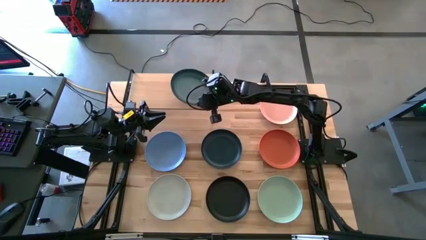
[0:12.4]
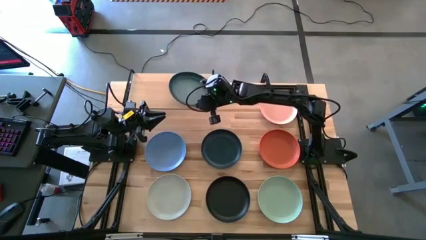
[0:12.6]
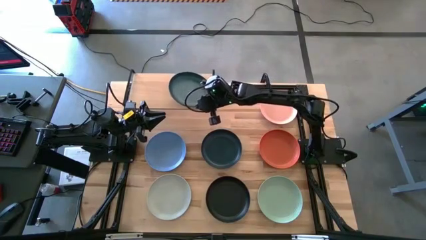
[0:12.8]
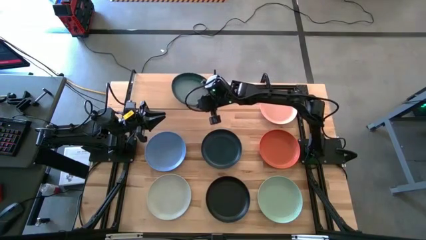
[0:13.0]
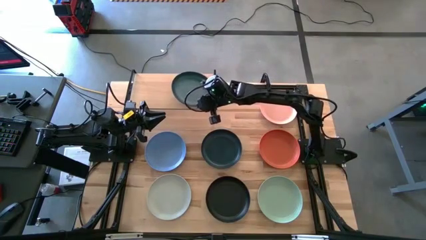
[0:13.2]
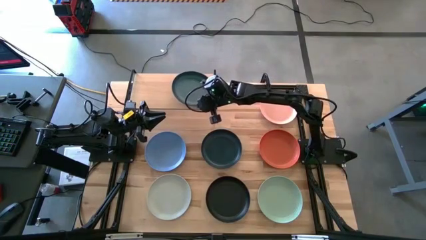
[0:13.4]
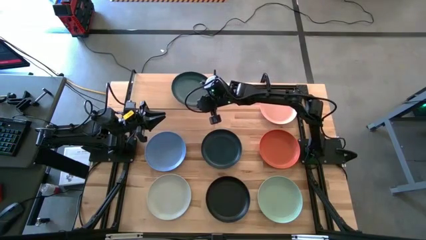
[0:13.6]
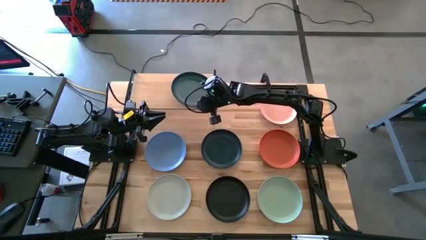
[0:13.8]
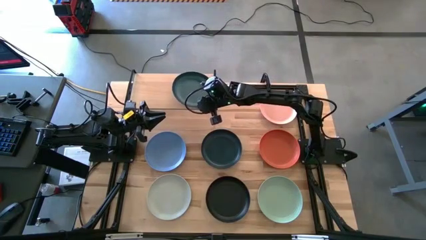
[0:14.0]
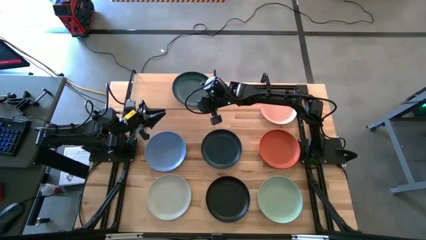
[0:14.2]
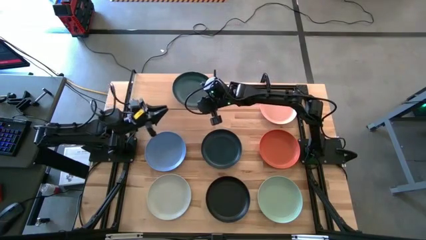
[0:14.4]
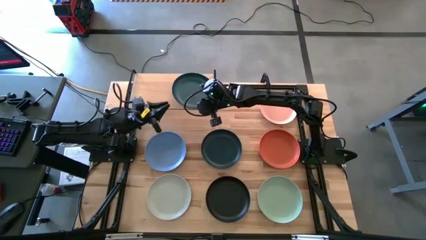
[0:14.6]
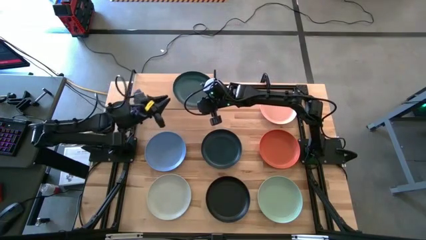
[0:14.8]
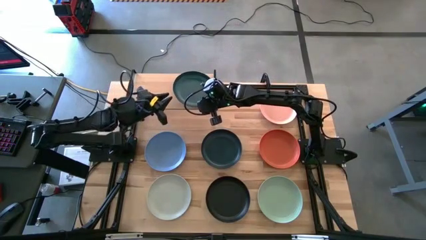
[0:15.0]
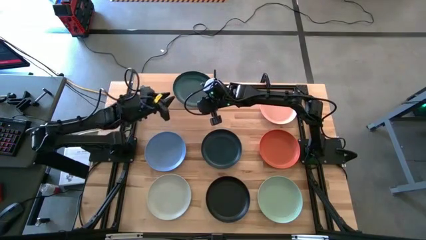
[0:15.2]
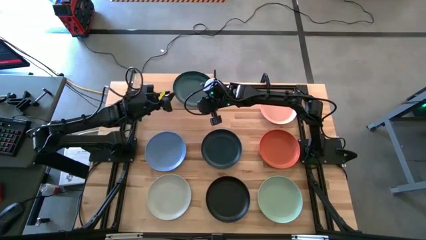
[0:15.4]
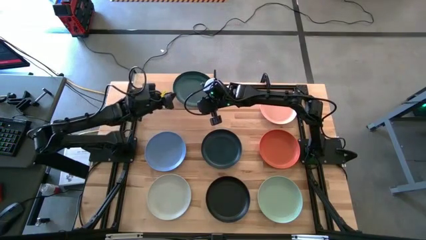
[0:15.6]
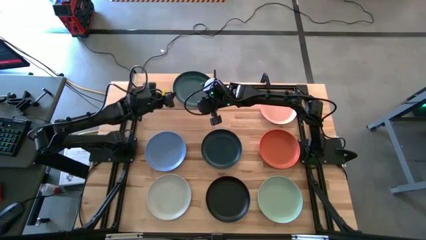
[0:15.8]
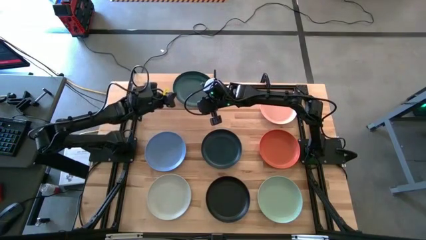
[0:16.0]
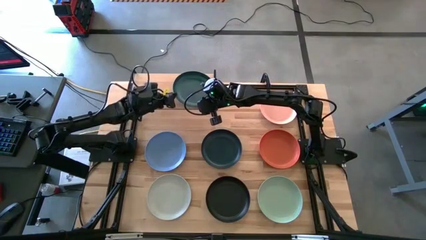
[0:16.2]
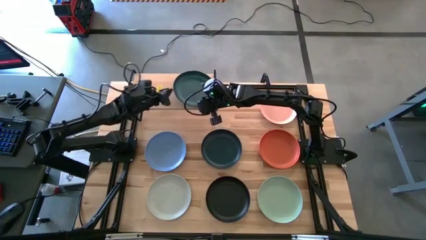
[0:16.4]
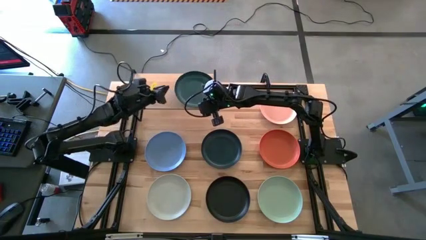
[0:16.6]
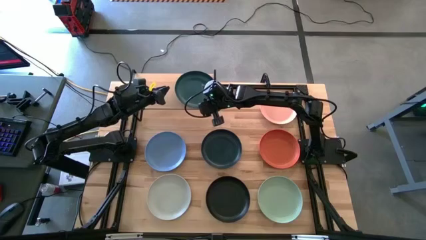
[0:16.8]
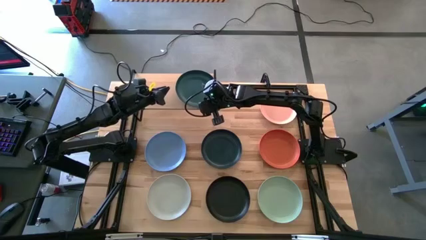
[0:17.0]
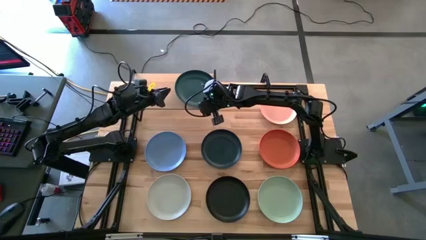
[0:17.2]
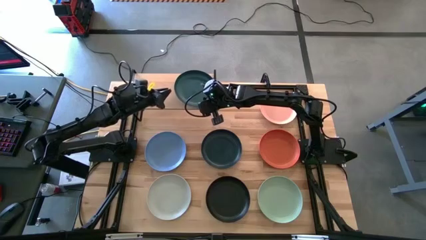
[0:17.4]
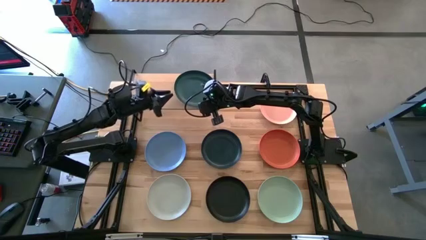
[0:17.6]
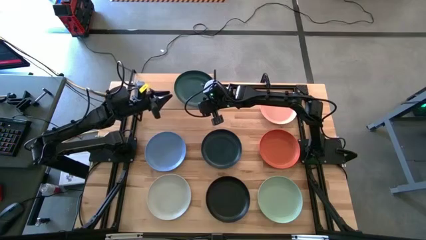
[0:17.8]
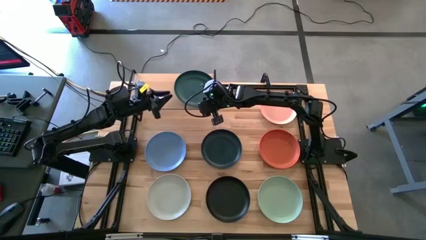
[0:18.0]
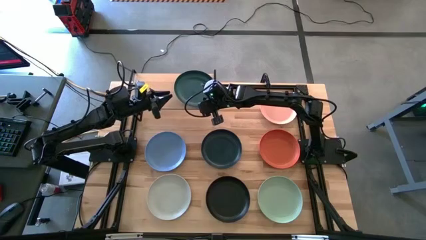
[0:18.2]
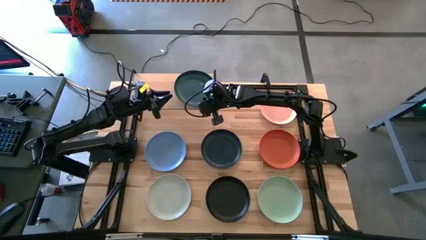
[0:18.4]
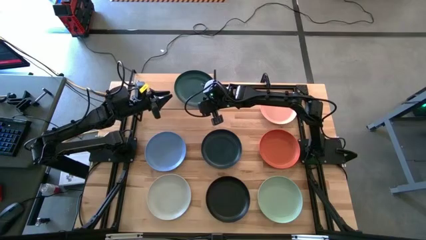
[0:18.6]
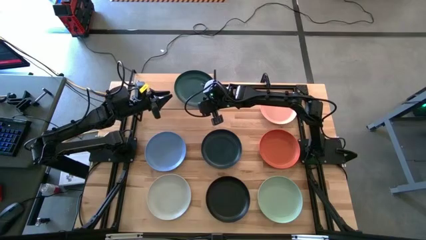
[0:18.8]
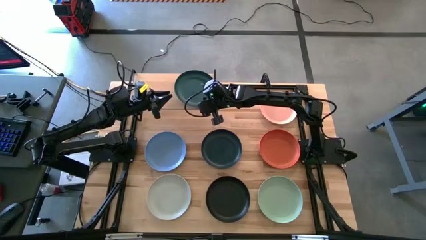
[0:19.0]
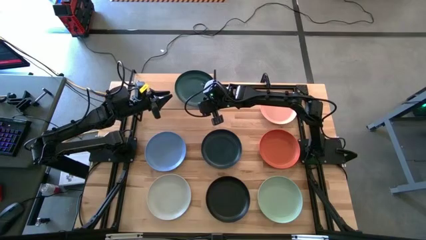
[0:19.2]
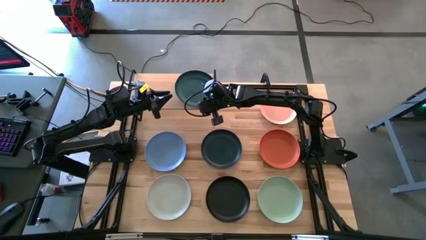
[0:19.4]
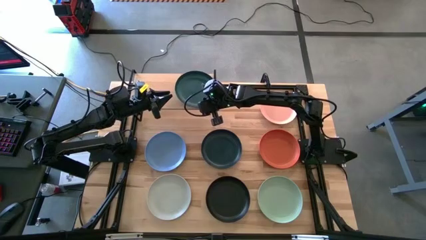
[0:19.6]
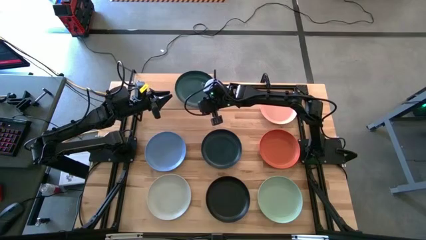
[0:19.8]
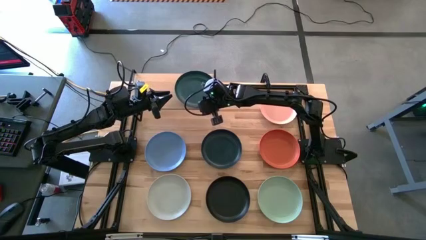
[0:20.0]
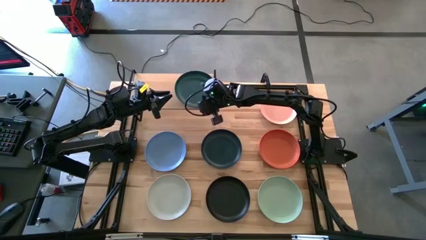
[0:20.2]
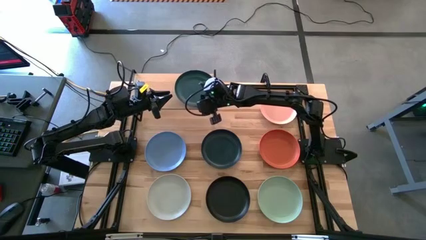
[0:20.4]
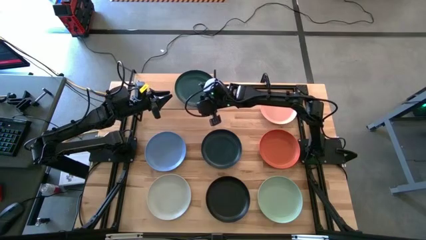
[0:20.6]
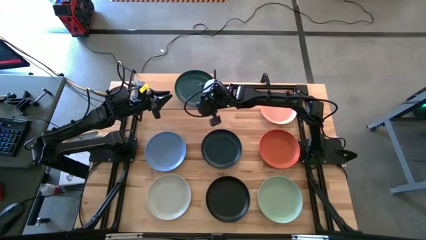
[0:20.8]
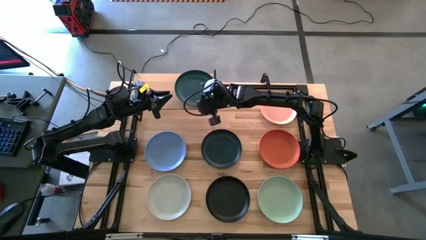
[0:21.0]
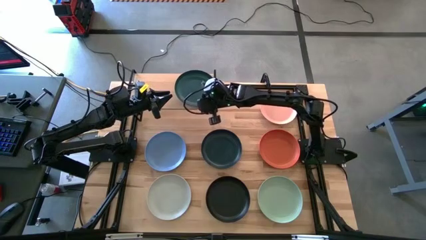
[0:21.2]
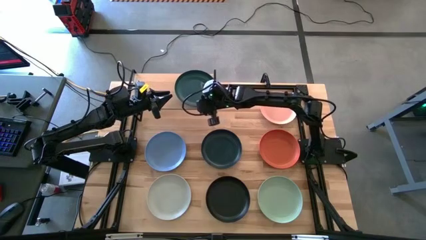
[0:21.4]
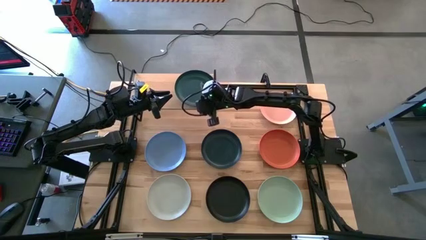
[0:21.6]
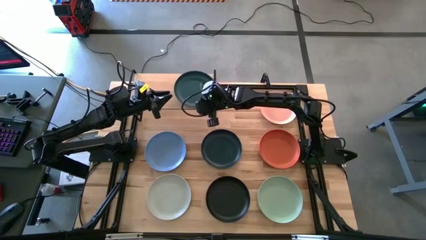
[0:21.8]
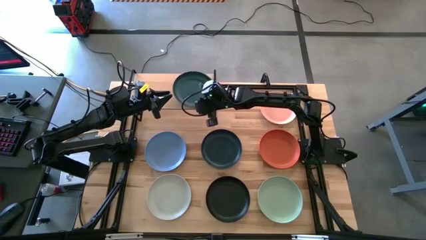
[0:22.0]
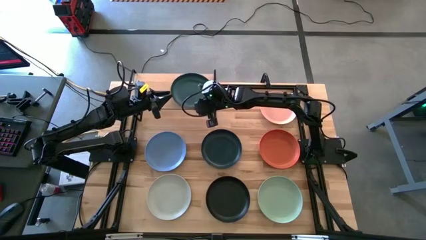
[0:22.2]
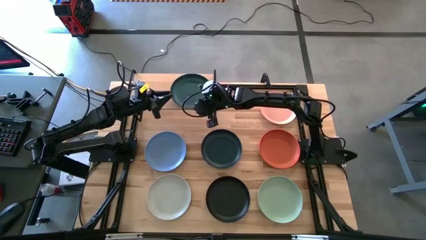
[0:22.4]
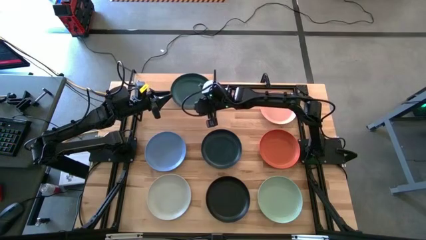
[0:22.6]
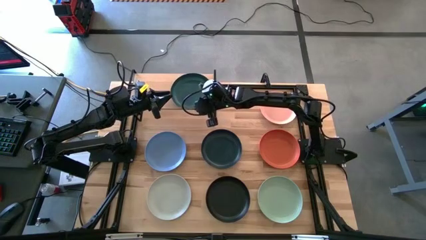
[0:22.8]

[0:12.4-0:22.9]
Task: Place and stack plates onto a shelf
Put the top dark green plate on the shelf

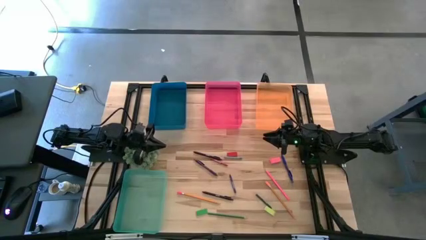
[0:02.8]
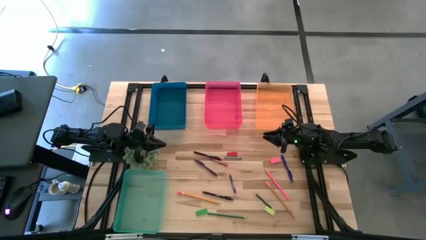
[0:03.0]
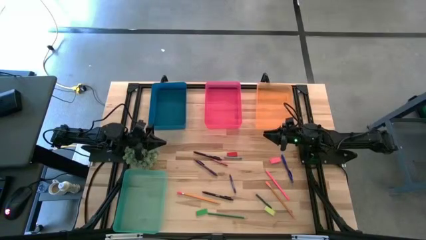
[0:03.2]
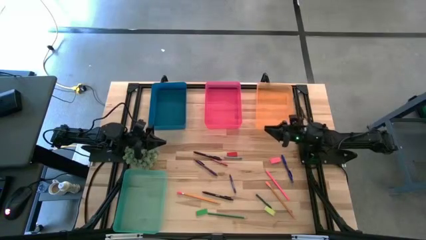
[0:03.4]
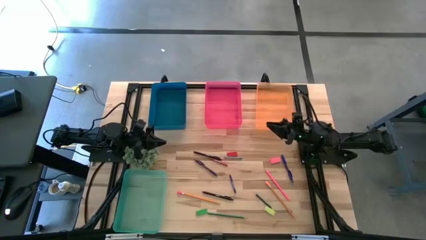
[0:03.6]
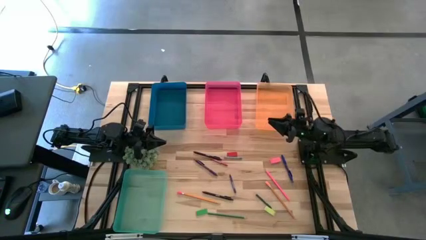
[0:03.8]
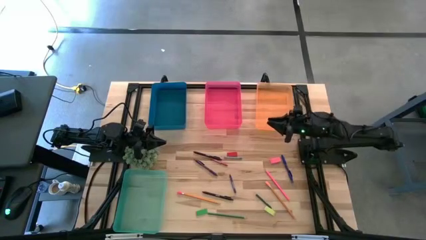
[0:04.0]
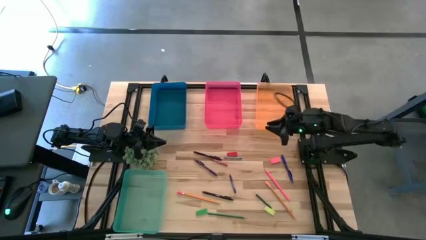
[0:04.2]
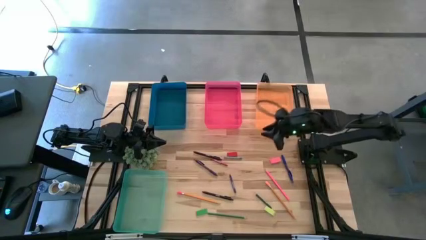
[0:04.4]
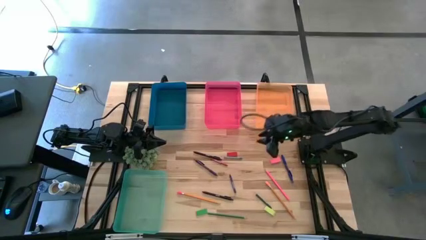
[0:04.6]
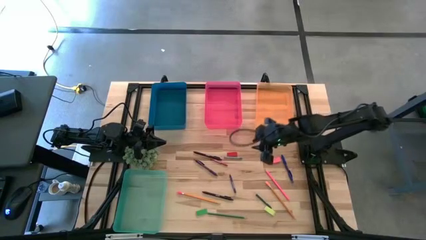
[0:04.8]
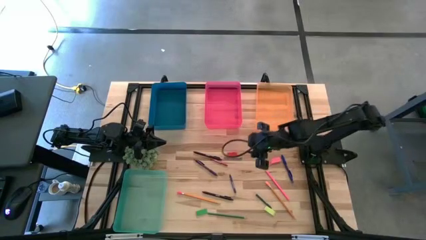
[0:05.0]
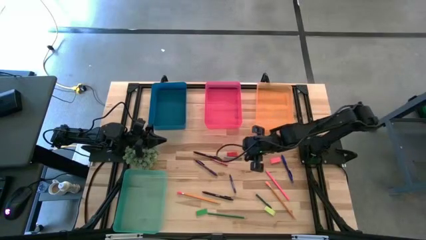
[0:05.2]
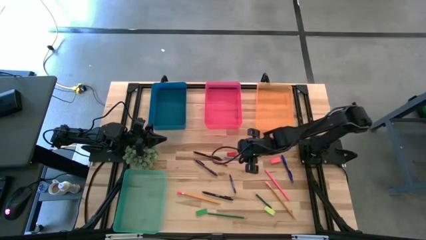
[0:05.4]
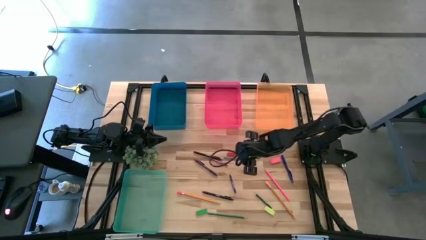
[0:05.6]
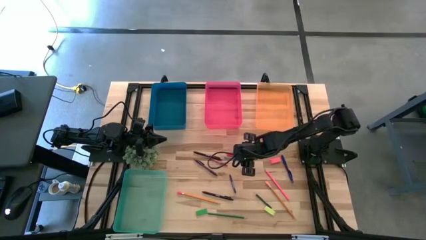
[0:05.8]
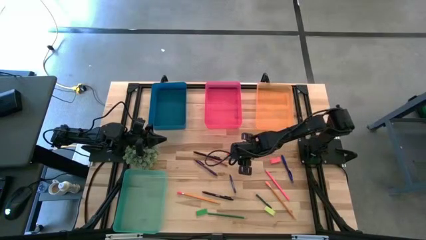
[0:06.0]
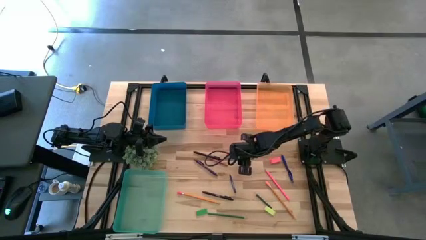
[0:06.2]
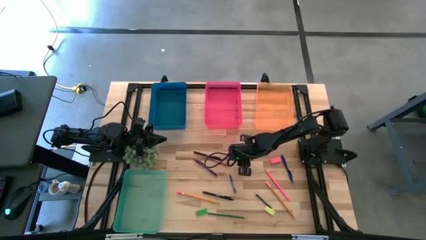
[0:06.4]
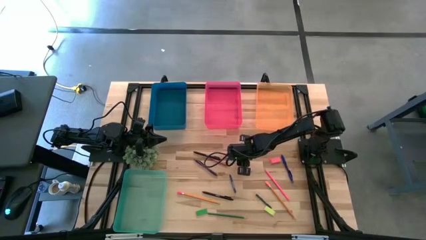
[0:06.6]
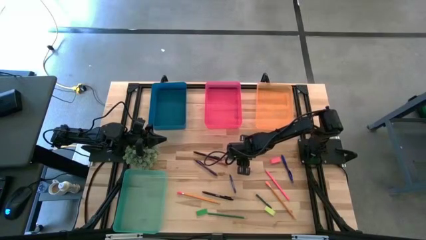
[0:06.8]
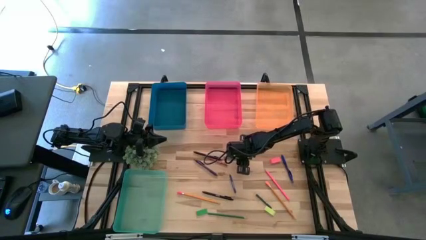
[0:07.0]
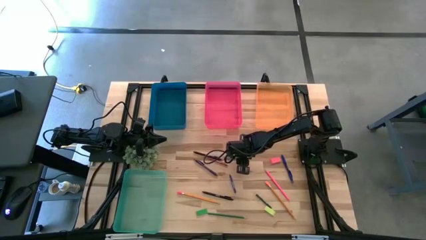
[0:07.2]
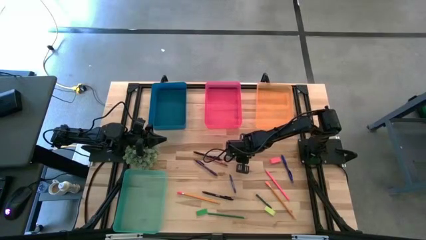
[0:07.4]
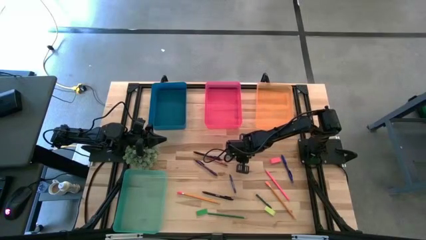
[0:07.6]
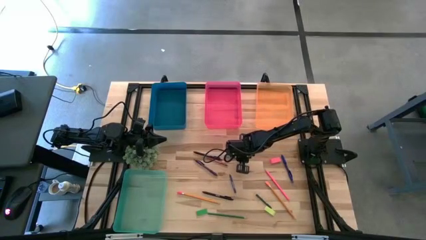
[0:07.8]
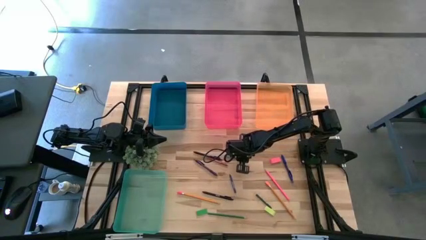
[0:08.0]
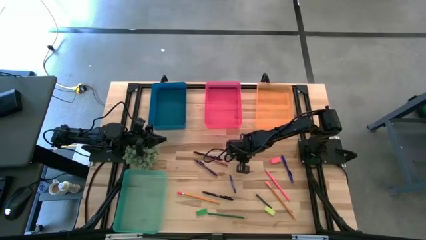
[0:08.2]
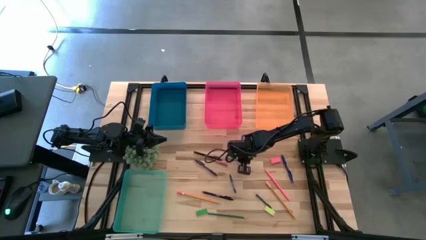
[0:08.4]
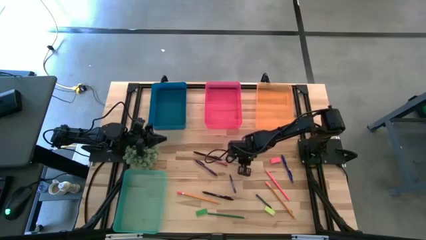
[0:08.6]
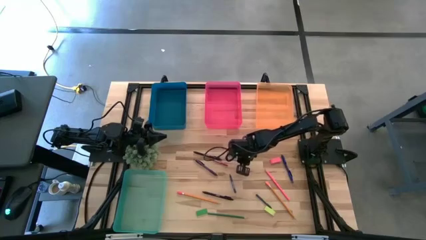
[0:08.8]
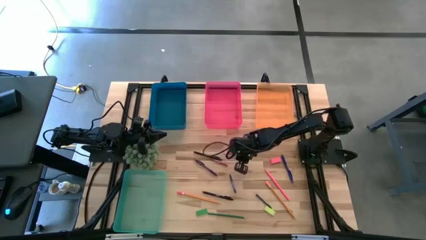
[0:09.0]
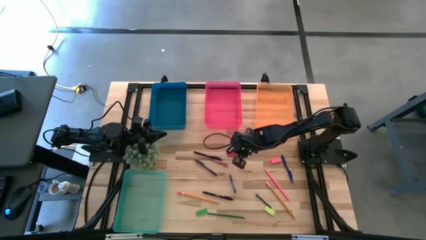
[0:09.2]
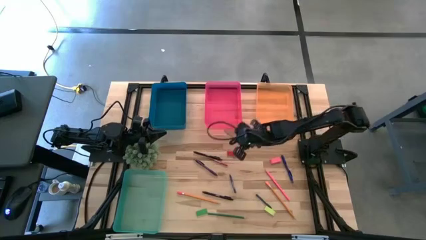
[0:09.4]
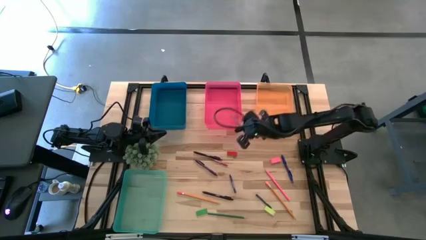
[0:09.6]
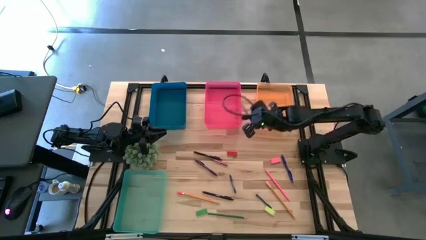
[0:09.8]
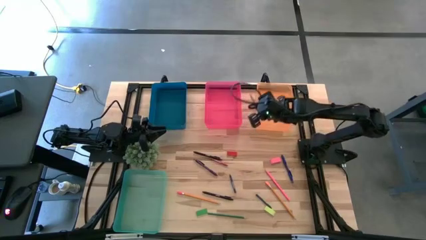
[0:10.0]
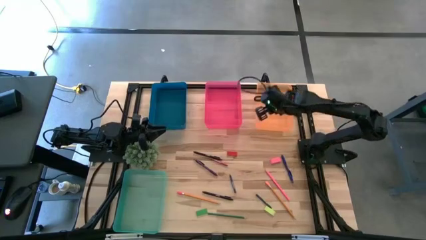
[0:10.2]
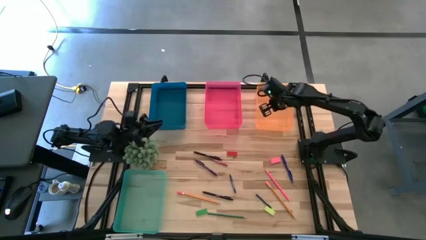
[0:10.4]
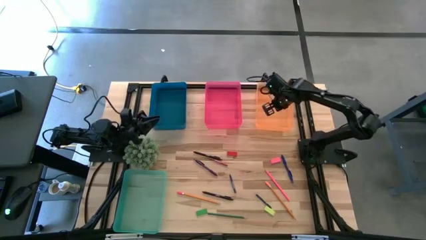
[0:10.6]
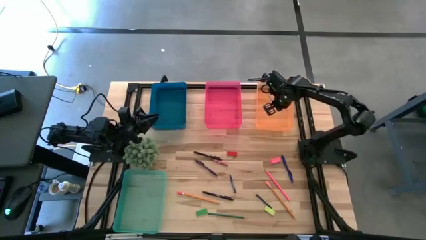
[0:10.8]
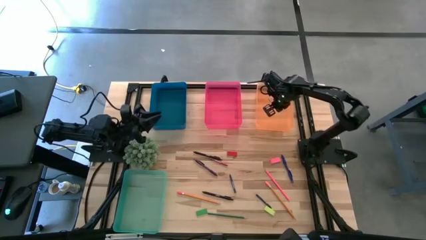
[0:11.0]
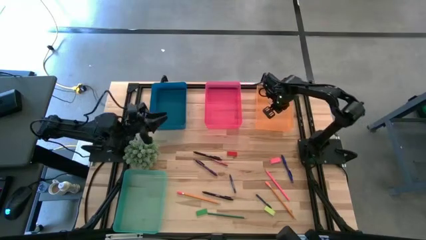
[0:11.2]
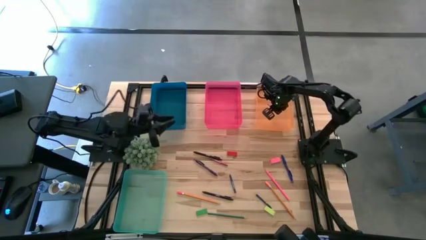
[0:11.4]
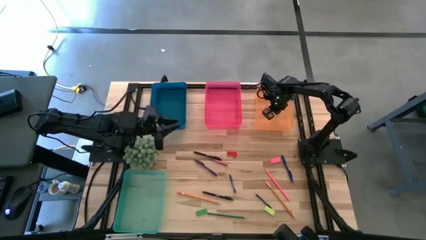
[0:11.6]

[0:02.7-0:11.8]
Task: Sort crayons/erasers/pens/pencils in bins
Put the light blue crayon into the orange bin
